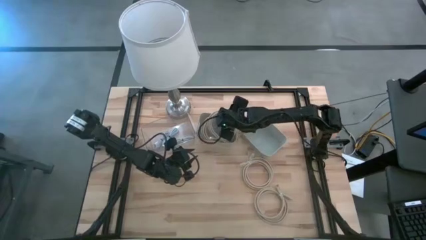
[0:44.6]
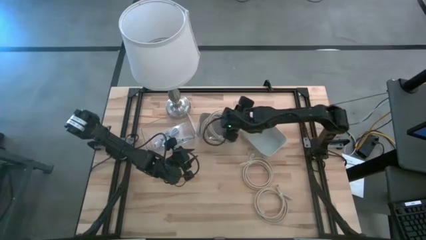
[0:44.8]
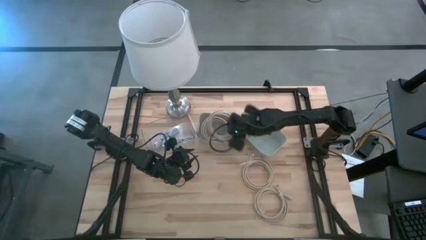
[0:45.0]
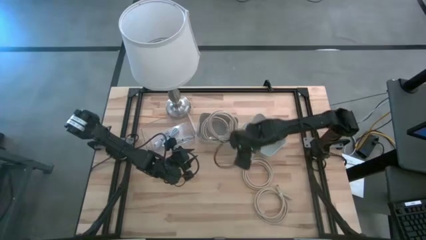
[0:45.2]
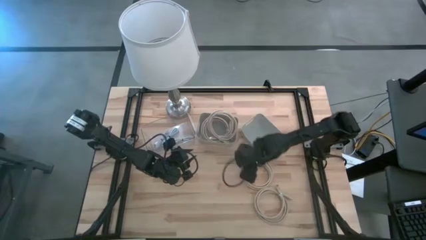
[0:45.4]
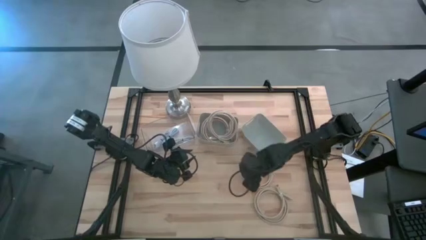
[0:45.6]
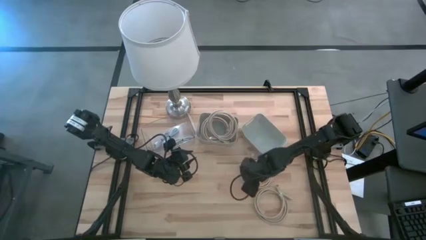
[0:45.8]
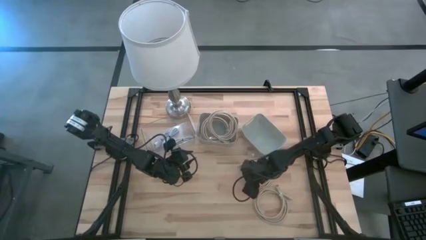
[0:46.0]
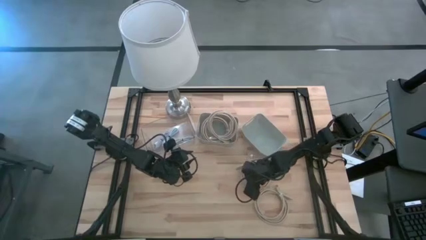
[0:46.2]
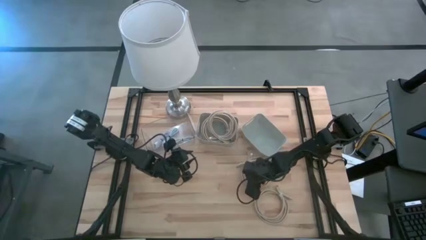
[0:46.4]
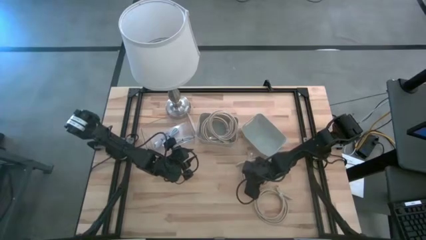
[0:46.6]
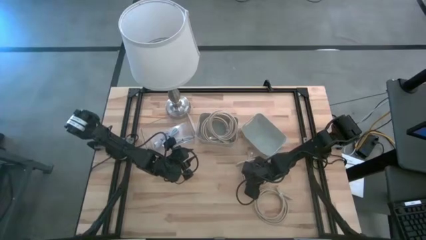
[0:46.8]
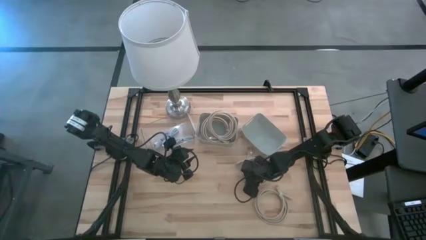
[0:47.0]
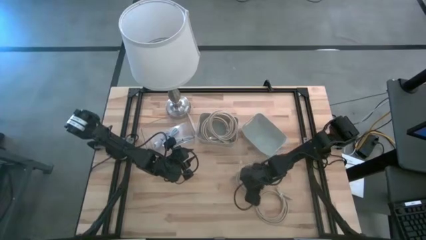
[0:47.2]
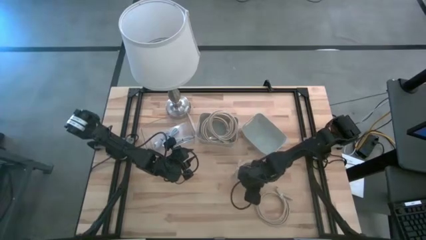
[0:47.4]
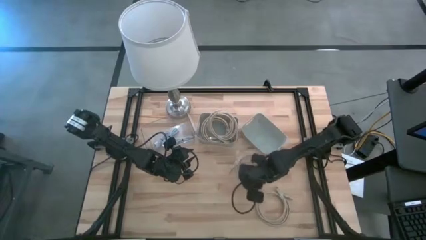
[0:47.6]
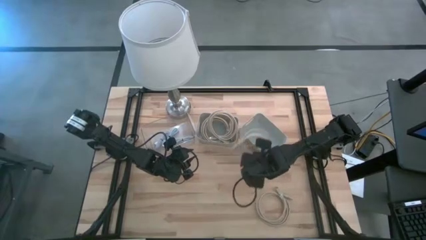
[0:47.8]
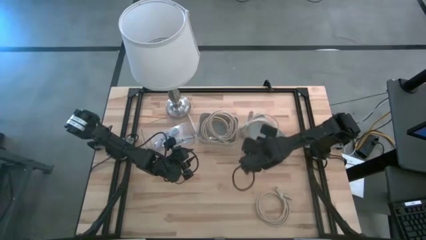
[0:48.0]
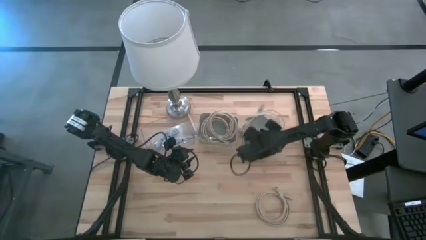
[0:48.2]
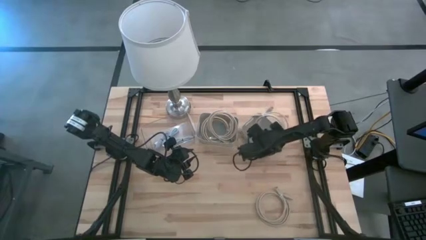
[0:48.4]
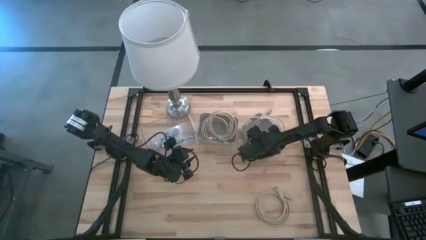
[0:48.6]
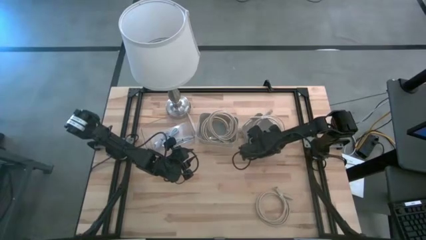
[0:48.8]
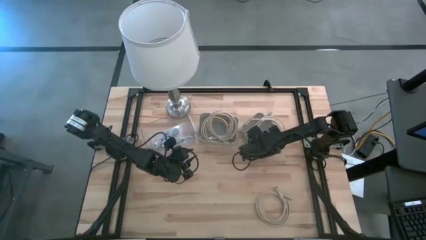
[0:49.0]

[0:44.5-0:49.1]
Task: Pick & Place USB Port
Put the brown hdmi cable into the right light brown bin

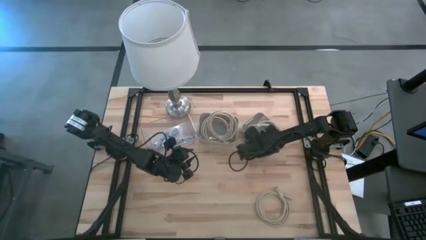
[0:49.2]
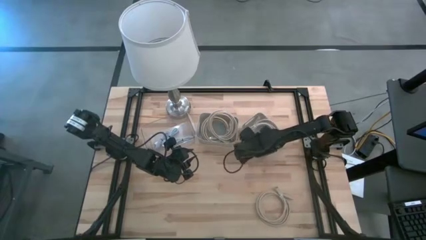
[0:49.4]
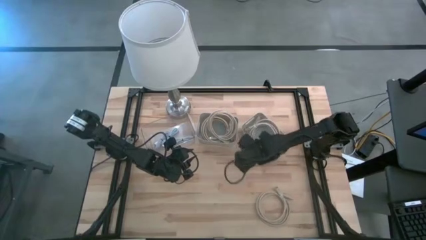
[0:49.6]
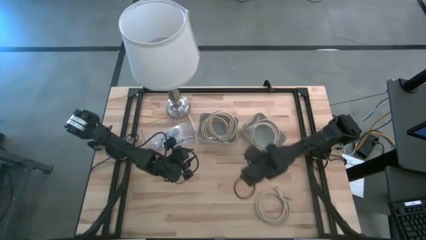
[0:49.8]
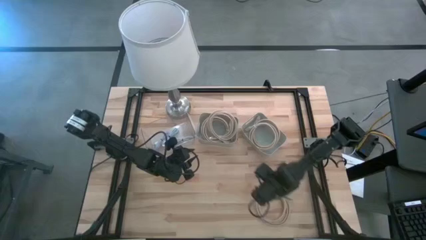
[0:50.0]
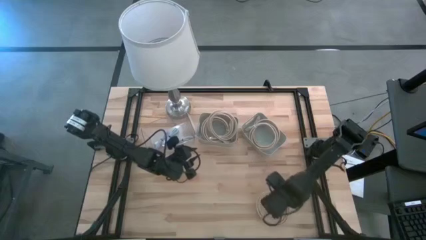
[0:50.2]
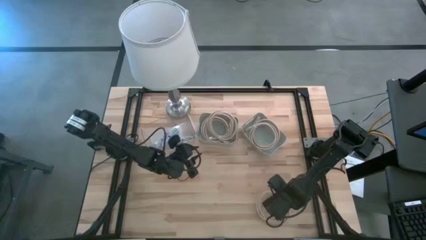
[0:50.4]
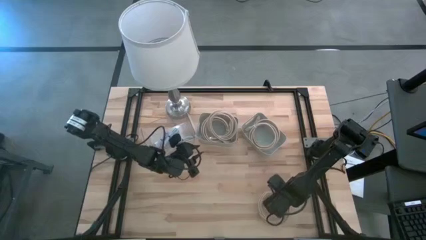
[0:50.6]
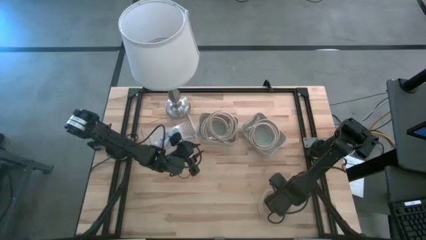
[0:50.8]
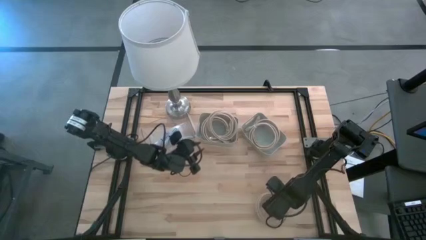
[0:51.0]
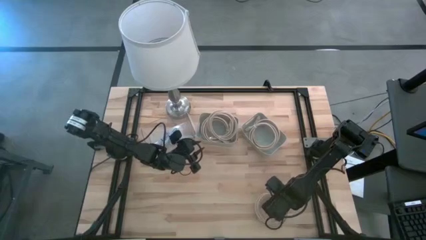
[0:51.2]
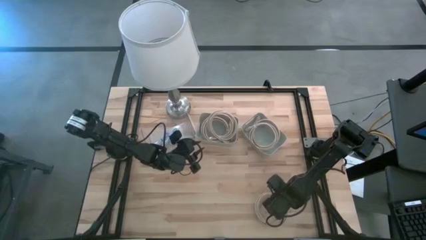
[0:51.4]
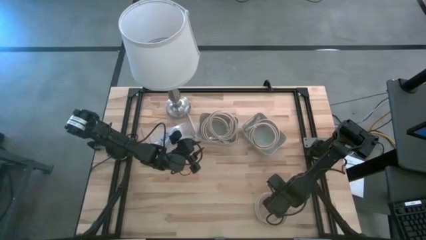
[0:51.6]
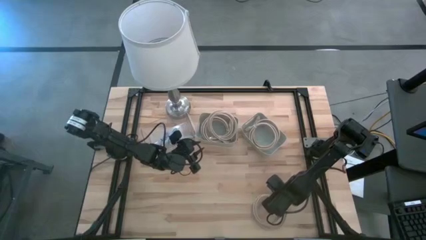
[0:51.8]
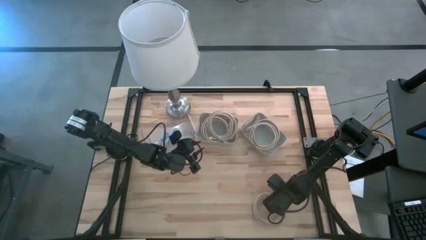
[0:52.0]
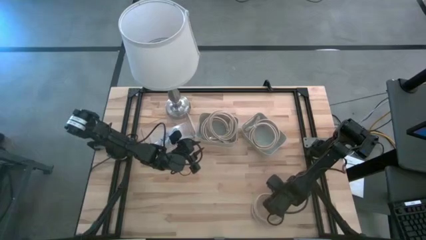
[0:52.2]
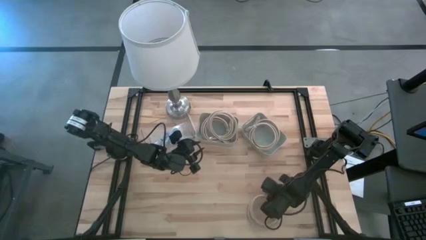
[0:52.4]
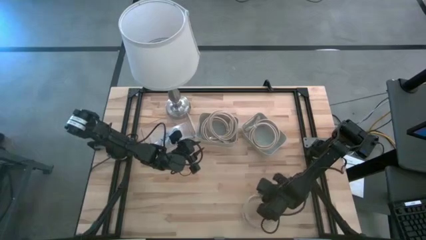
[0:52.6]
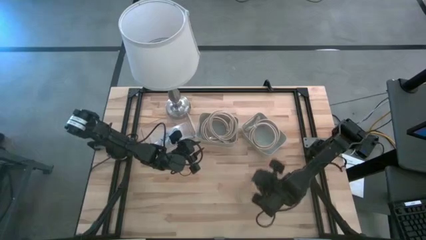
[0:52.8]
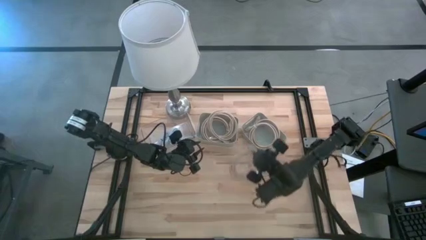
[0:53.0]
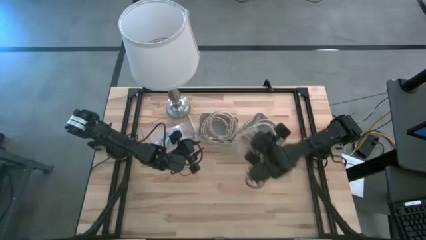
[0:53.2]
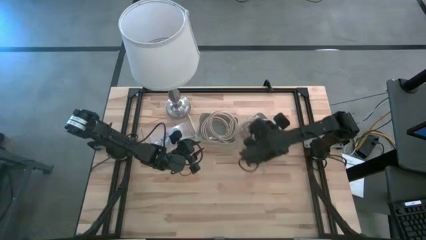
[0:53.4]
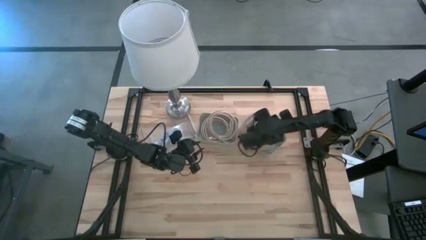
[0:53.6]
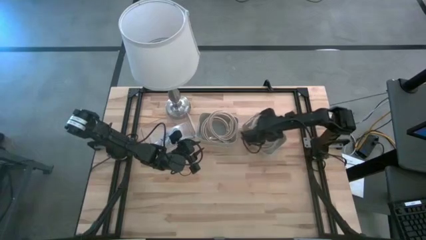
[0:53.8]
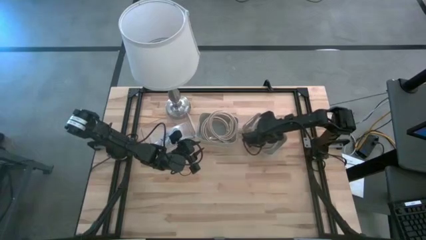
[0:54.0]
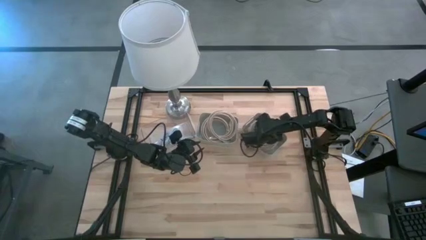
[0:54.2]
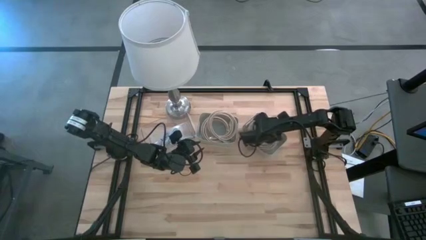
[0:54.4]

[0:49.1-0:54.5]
Put the brown hdmi cable into the right light brown bin

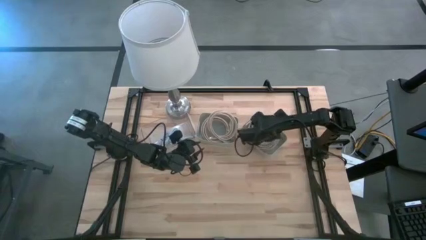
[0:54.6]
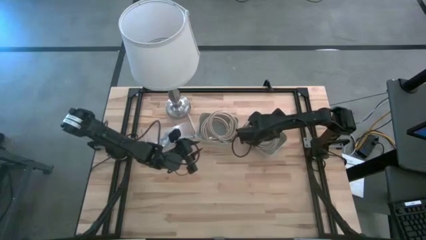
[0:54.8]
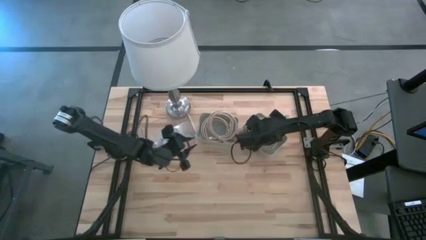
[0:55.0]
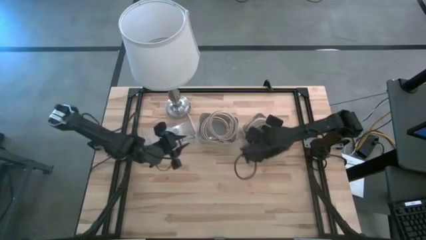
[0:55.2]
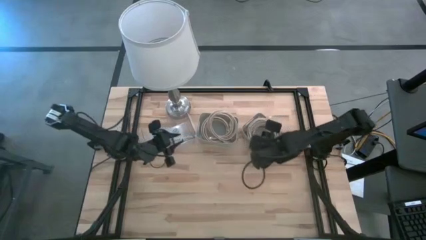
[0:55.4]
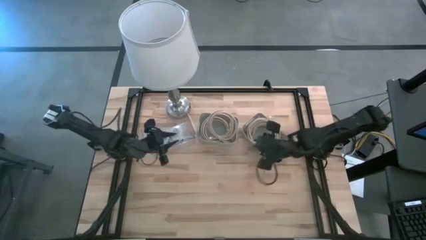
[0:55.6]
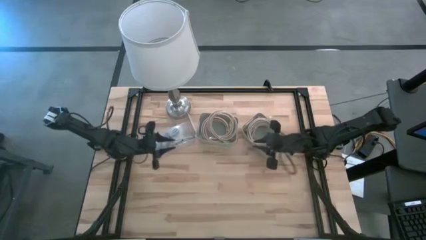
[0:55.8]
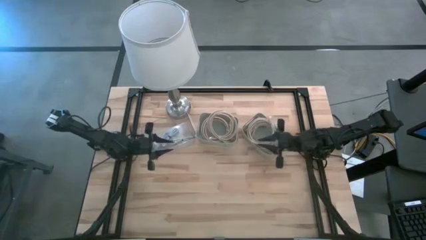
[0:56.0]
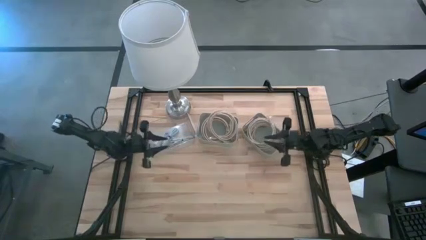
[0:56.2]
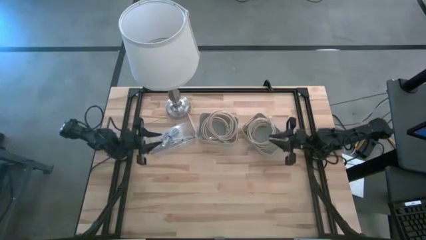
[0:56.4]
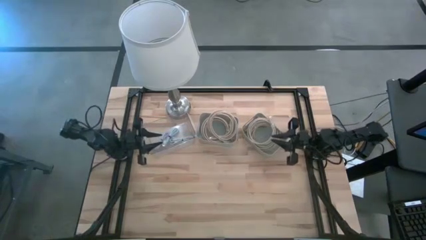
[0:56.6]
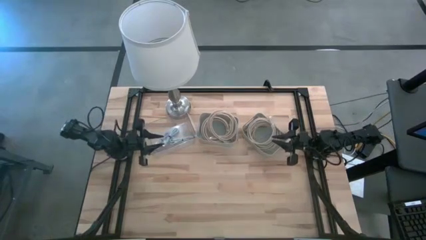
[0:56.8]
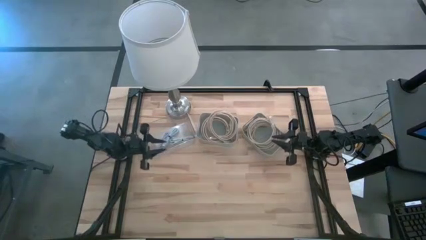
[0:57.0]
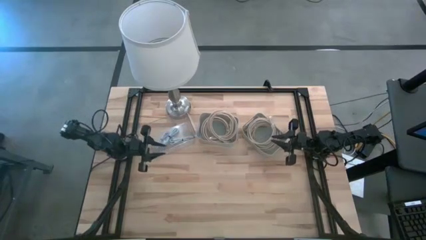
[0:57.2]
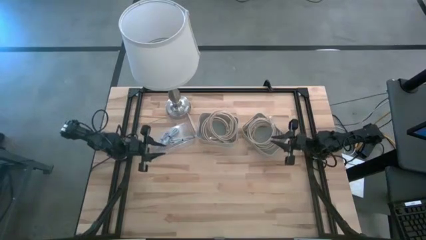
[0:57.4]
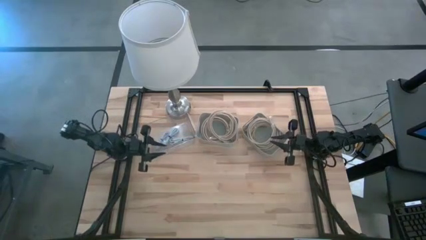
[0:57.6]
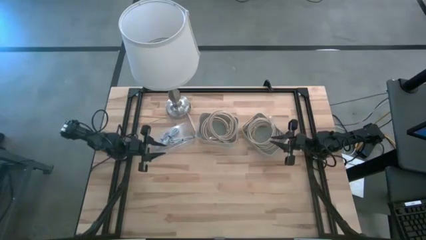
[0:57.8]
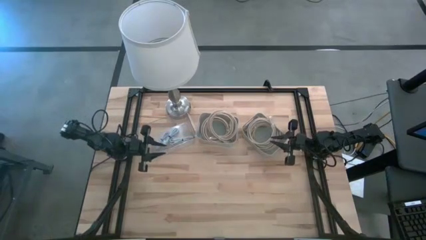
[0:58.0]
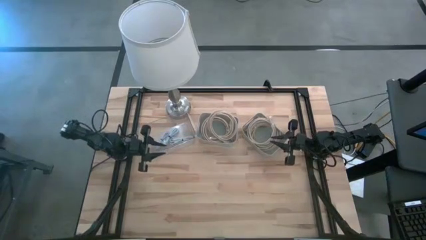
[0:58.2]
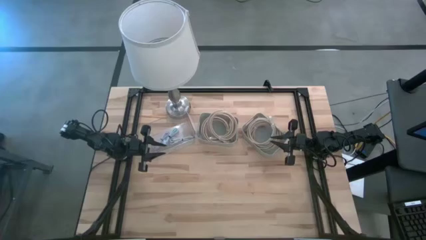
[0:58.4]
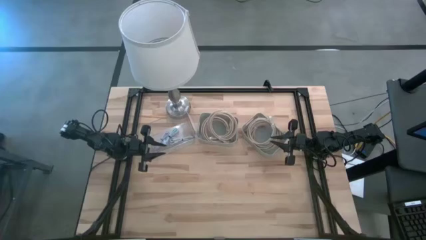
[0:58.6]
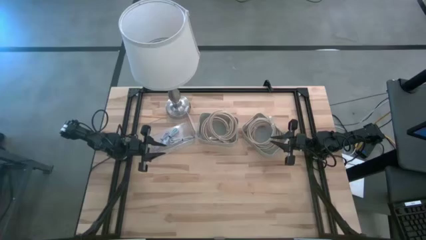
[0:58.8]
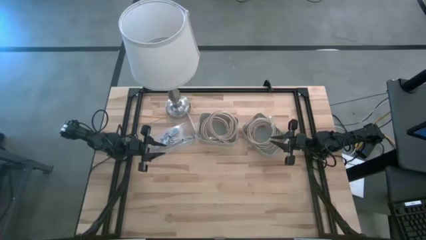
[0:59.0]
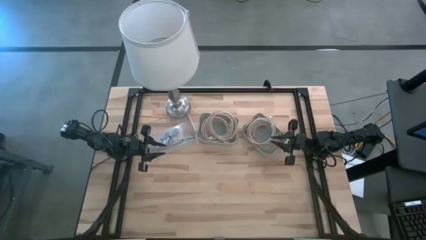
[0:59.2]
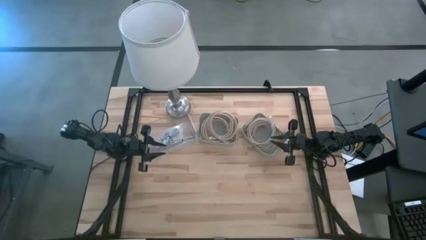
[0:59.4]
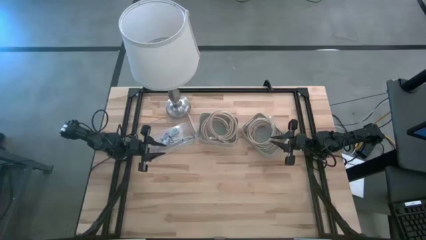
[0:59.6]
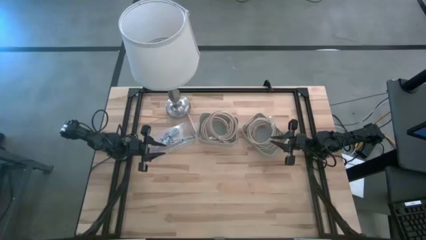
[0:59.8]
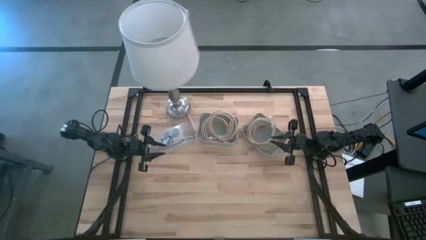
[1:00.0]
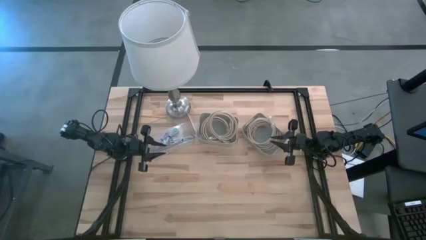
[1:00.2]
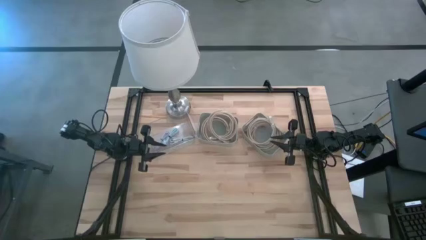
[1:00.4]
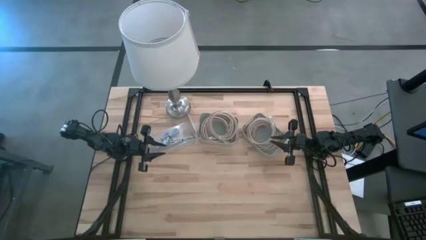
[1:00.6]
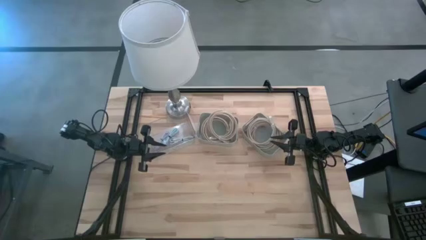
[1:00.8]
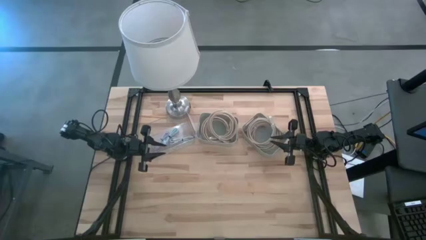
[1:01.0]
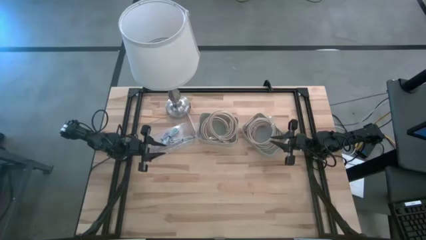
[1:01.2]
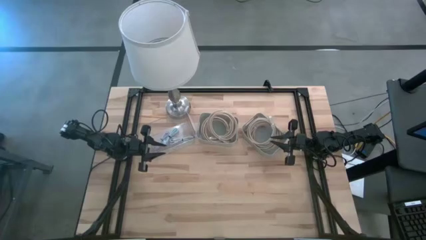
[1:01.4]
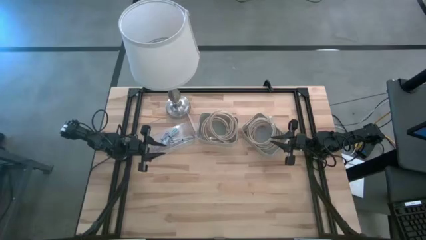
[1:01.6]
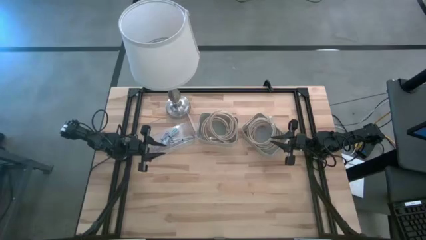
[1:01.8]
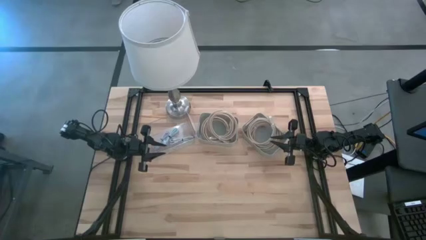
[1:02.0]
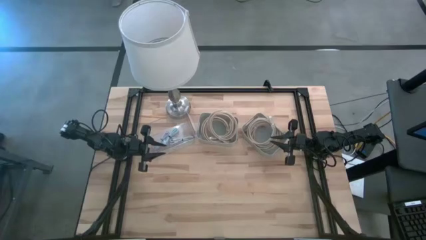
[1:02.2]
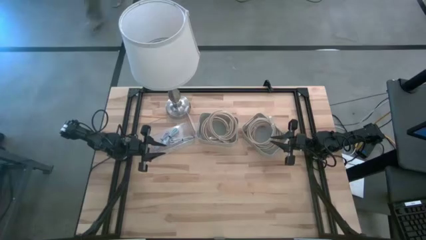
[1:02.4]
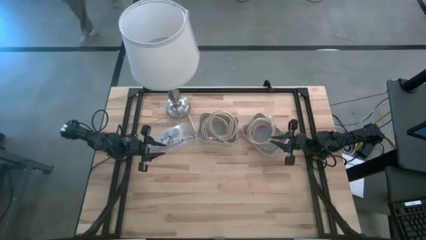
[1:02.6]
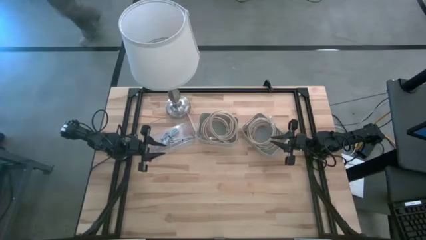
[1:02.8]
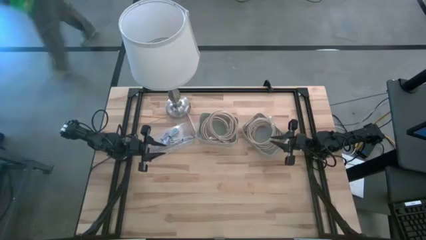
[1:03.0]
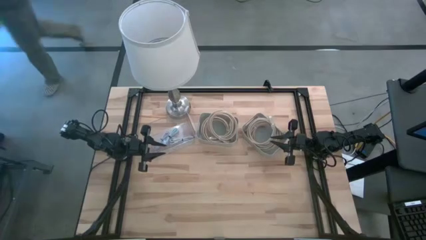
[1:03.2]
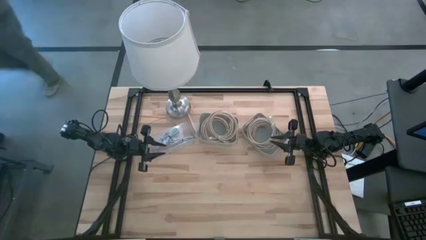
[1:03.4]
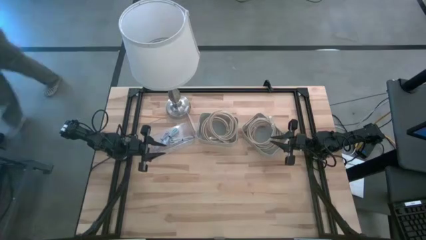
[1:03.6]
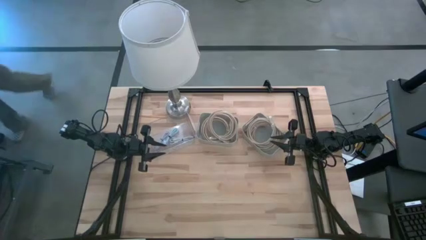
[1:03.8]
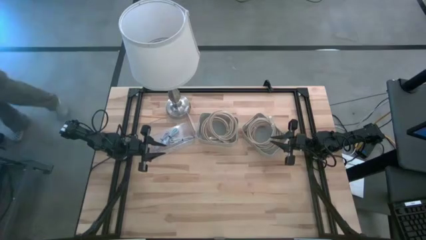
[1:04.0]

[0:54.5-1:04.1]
Return to Home Position
